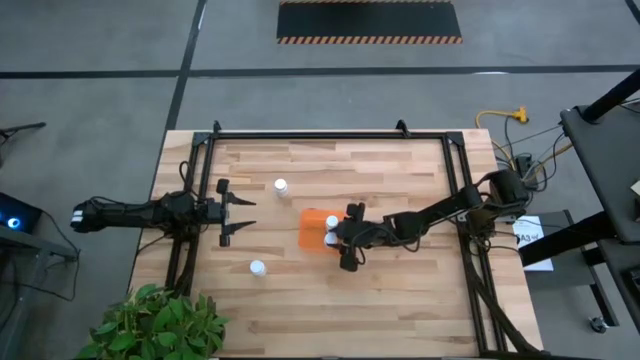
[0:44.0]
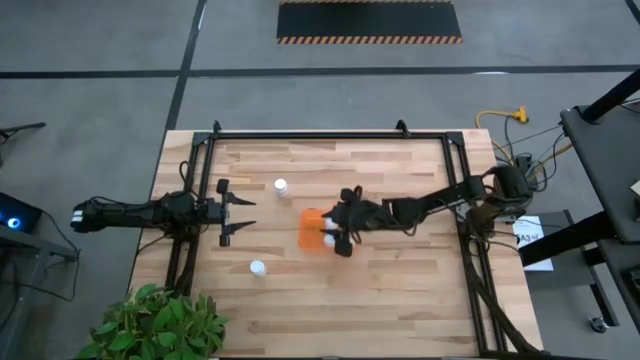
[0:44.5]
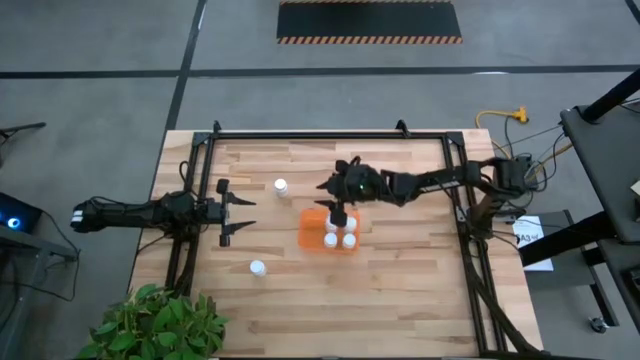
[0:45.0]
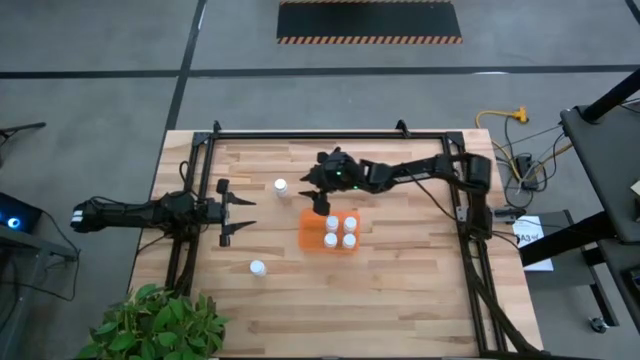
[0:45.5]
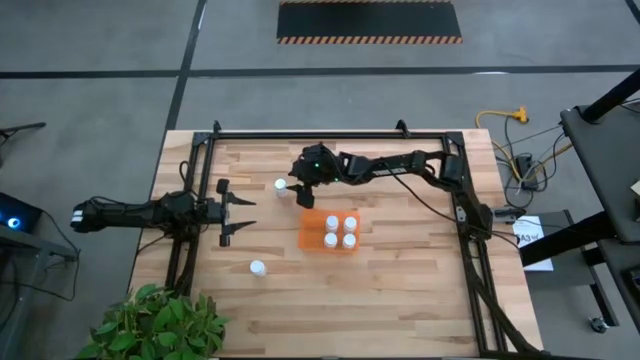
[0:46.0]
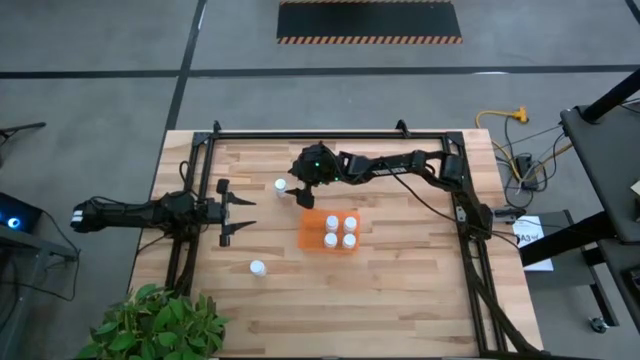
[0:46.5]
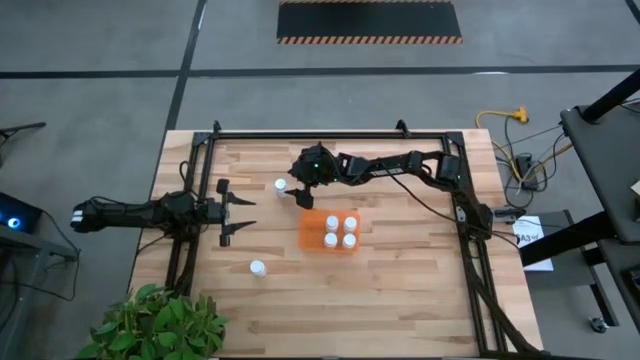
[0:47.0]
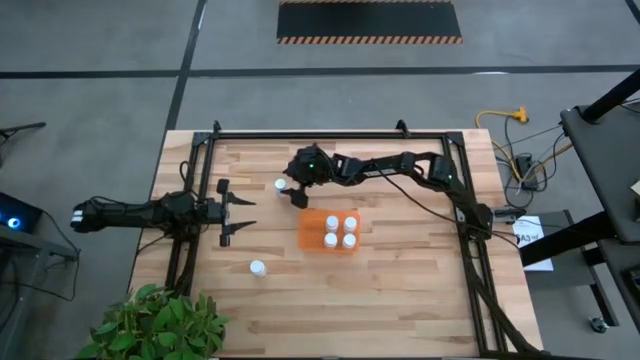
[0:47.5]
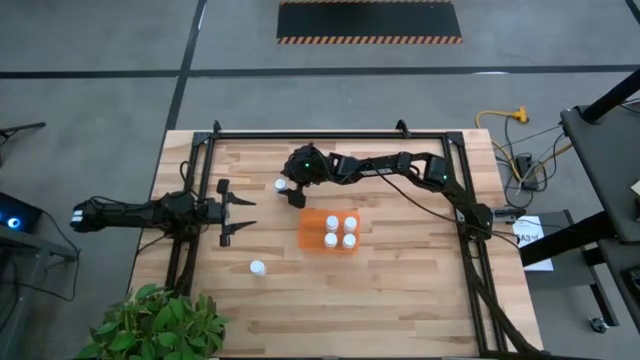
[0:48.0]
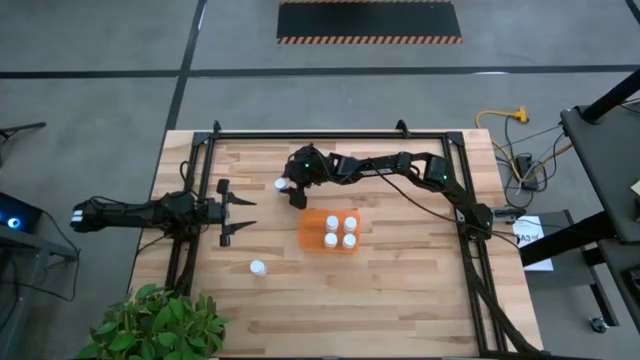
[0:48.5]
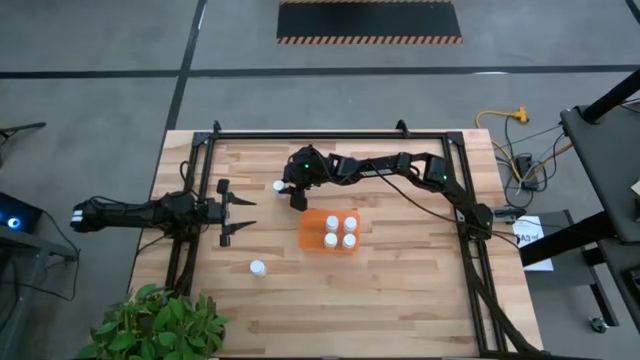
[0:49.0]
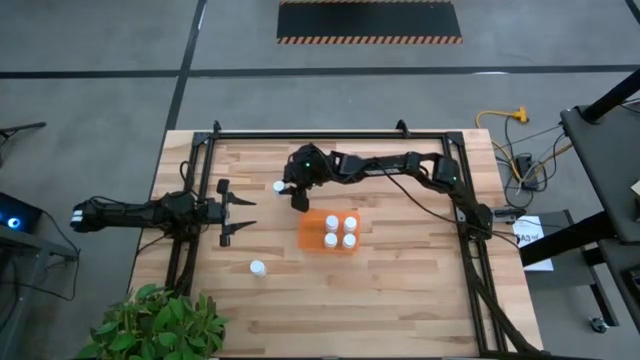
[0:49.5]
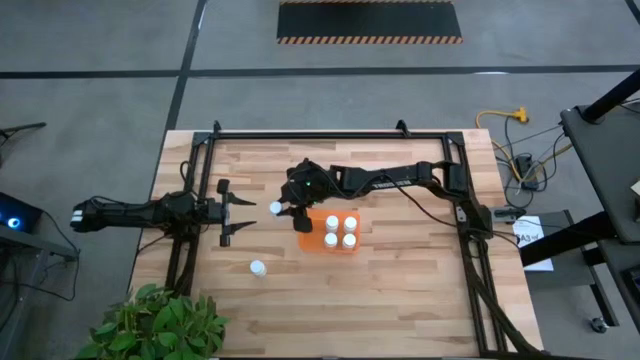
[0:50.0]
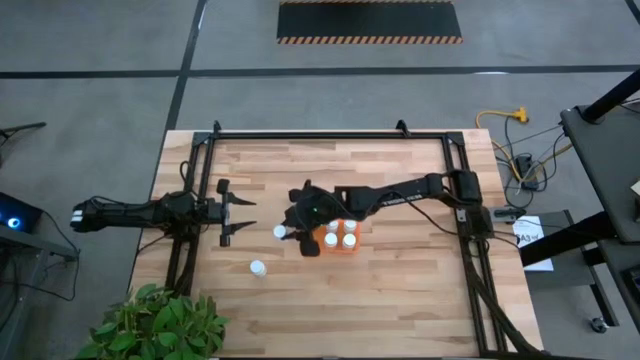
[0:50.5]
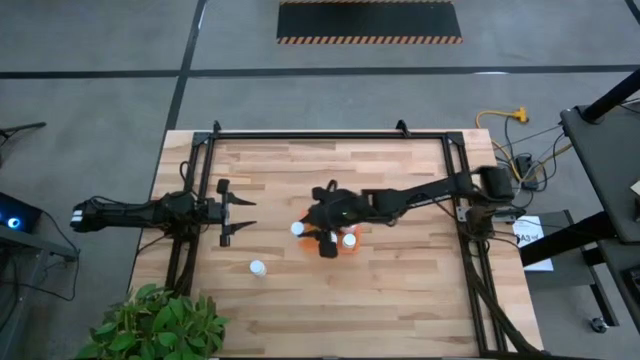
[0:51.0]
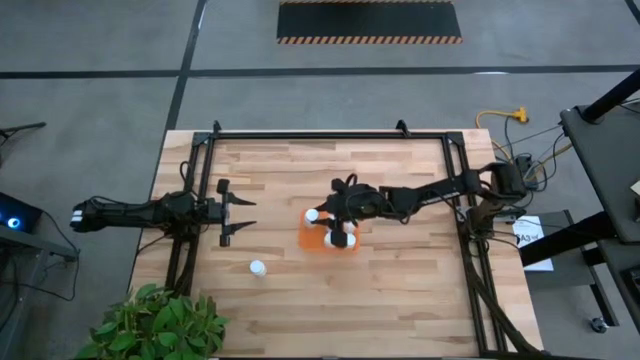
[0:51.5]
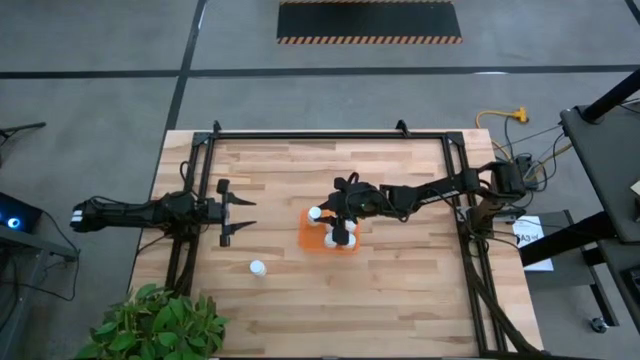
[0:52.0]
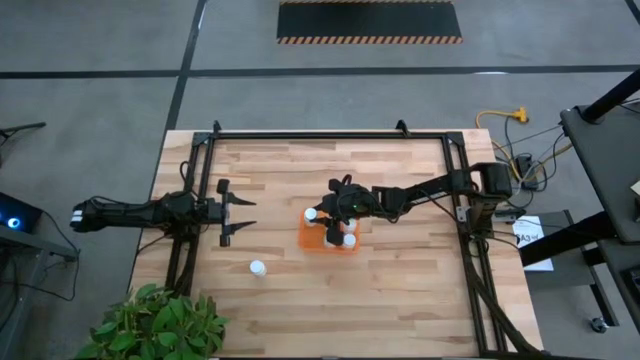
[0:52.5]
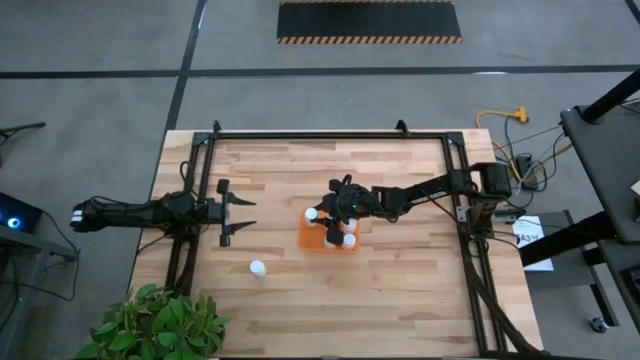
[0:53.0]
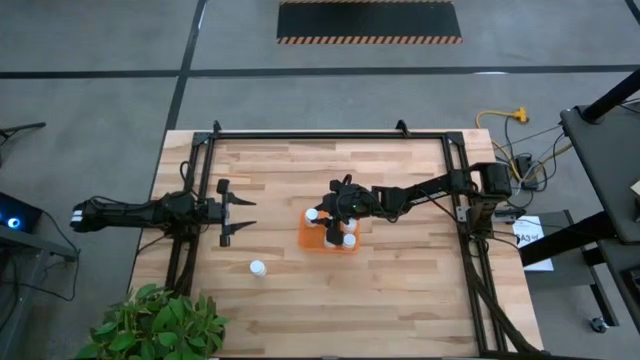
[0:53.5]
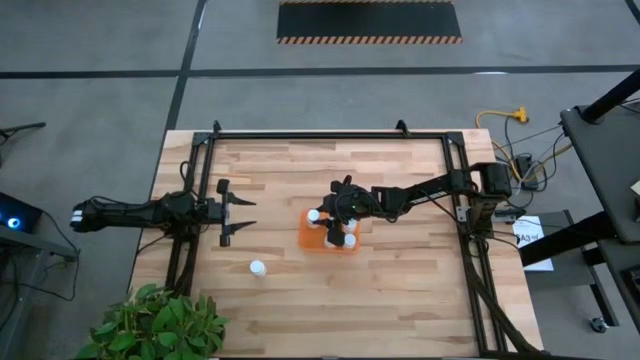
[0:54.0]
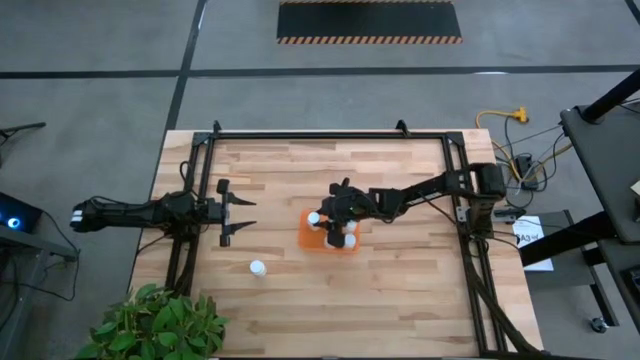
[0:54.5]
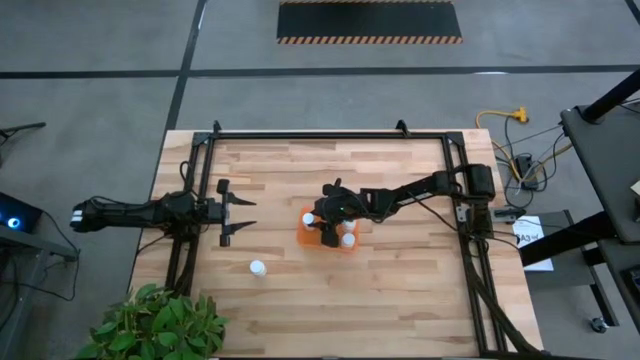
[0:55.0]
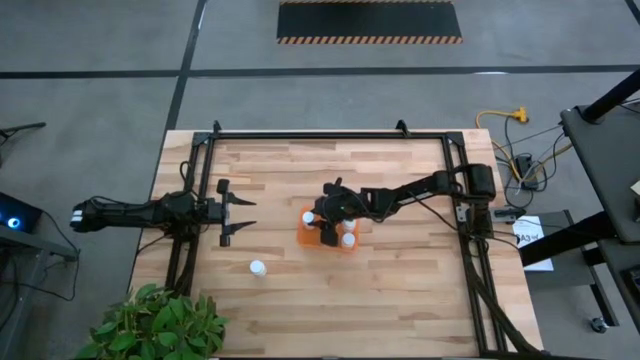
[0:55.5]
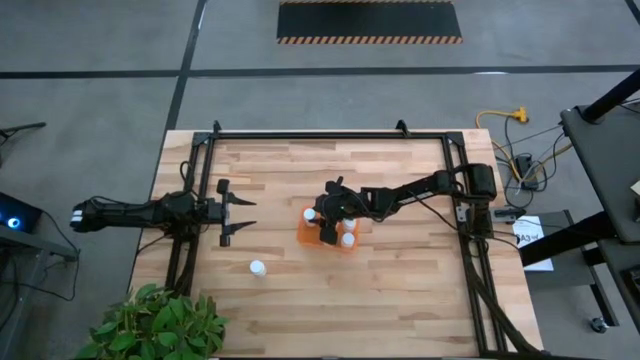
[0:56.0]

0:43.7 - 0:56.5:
Task: Pick and place pill bottles into a basket
Put the white medicine bottle into the orange bin

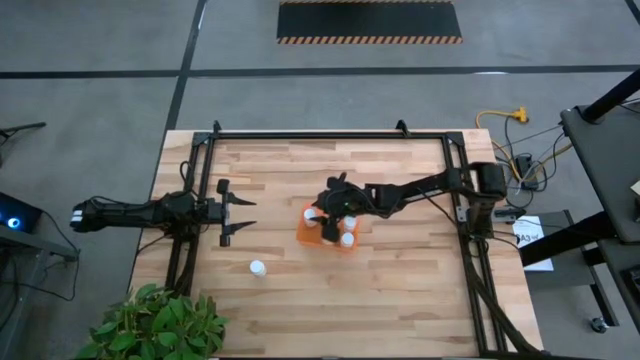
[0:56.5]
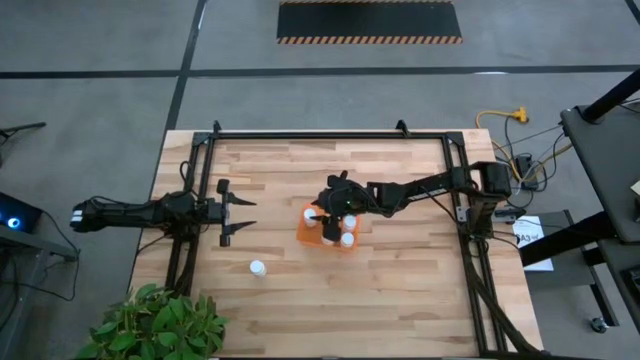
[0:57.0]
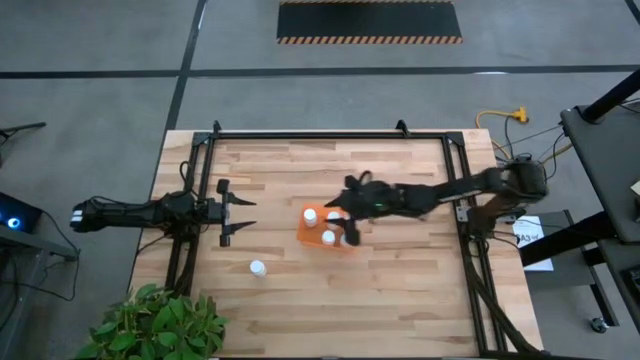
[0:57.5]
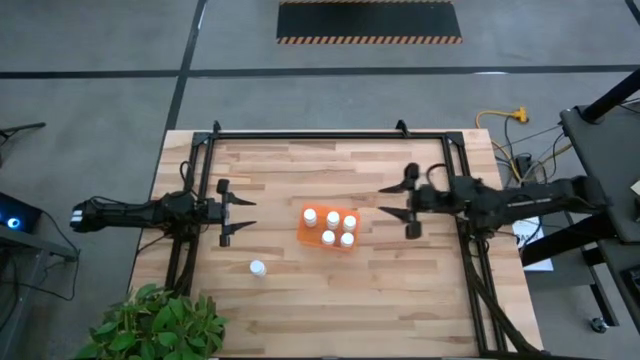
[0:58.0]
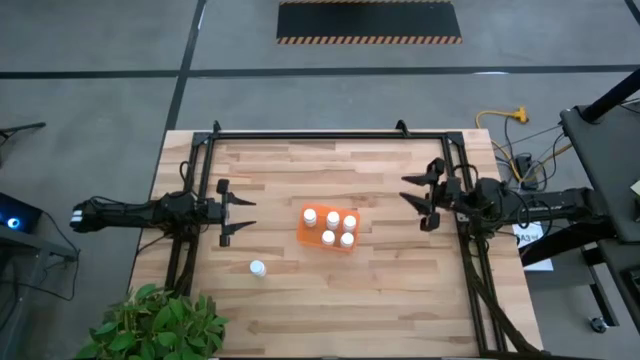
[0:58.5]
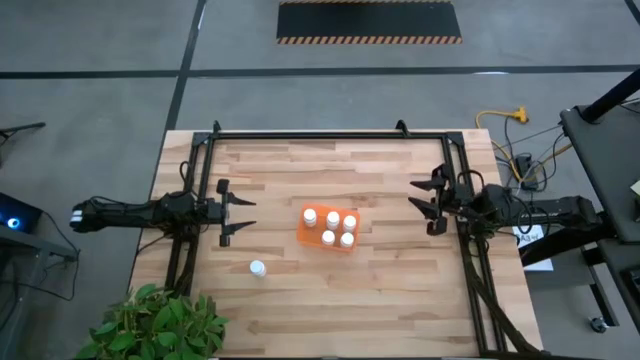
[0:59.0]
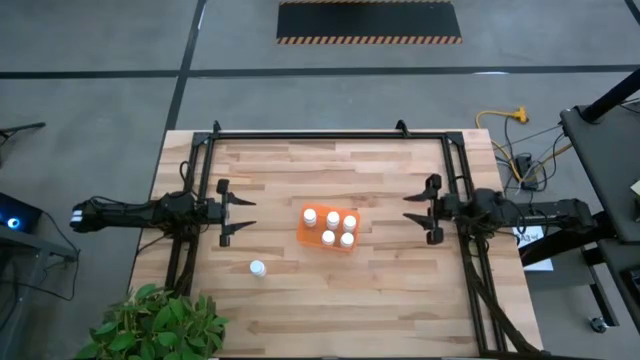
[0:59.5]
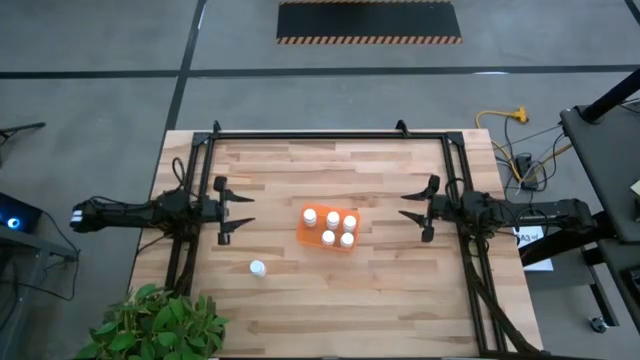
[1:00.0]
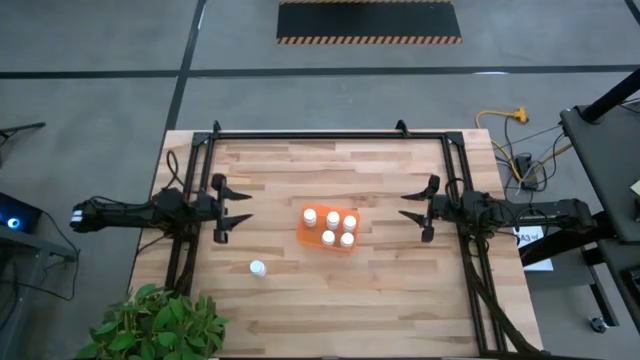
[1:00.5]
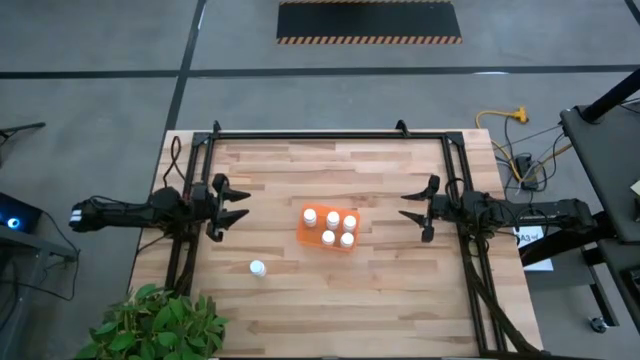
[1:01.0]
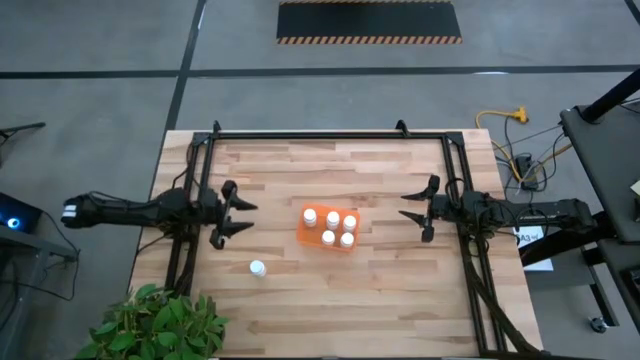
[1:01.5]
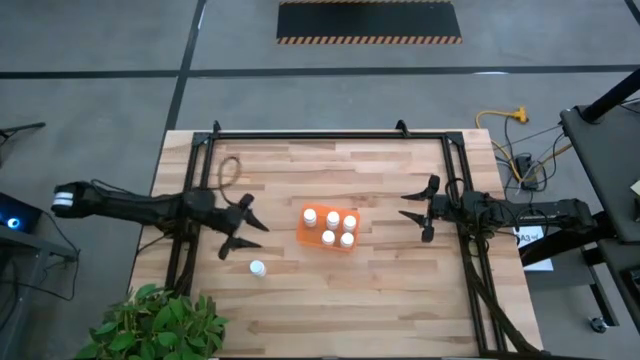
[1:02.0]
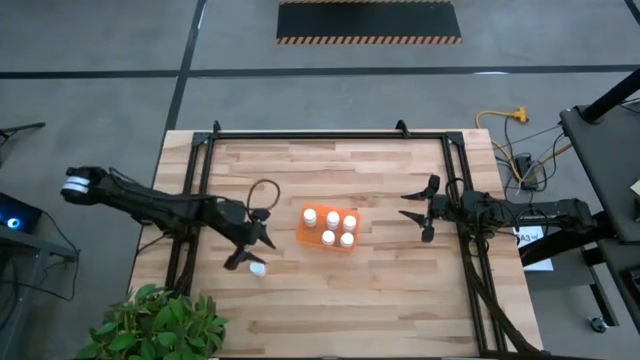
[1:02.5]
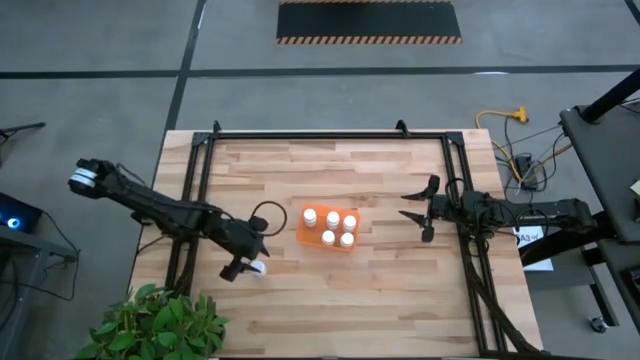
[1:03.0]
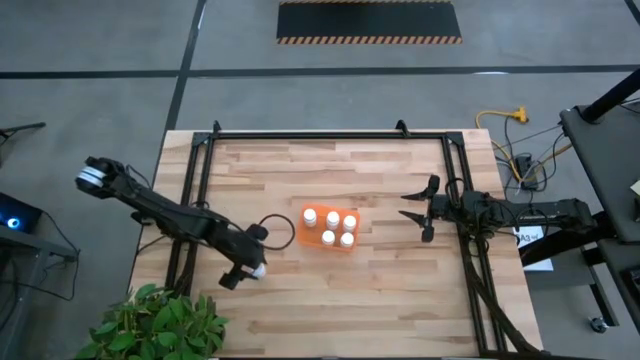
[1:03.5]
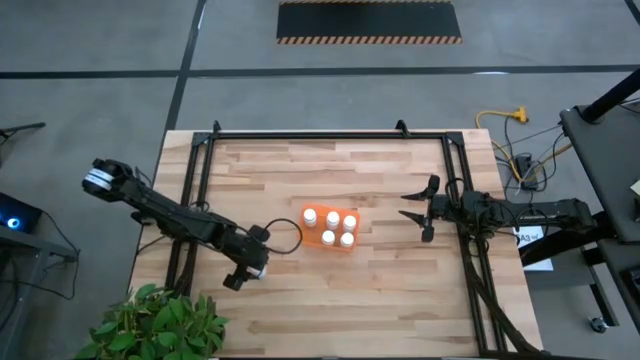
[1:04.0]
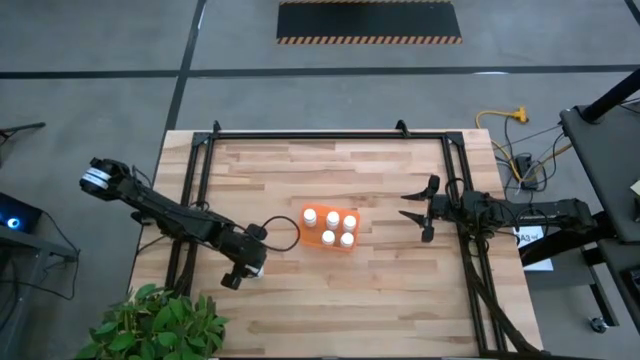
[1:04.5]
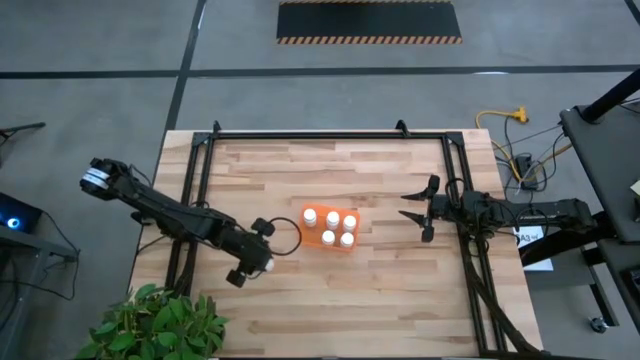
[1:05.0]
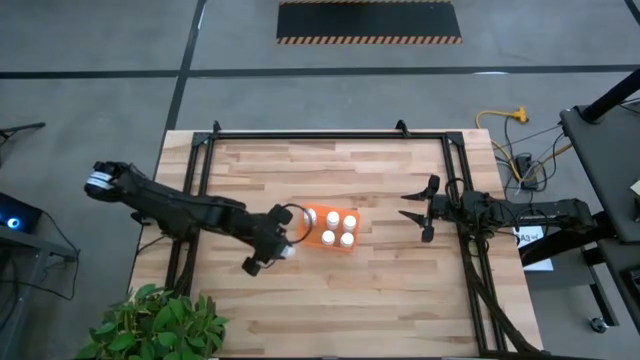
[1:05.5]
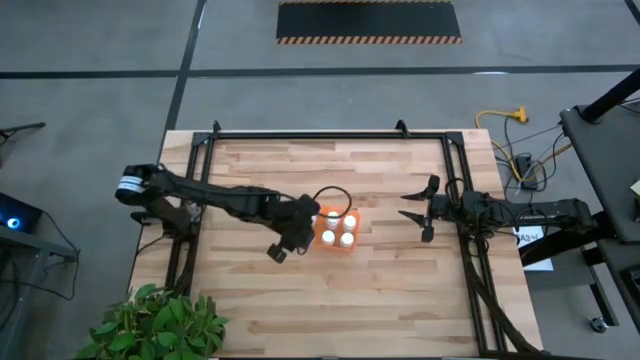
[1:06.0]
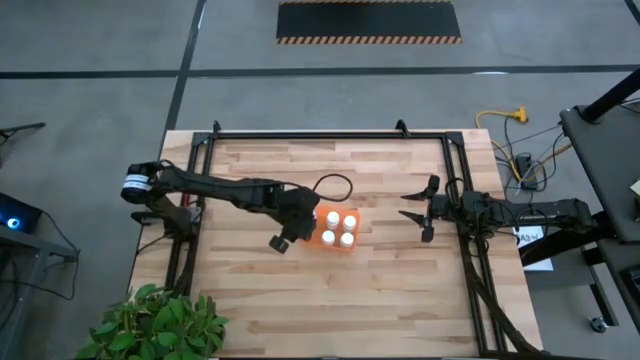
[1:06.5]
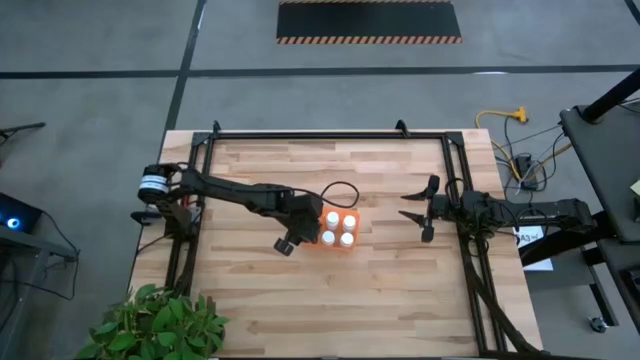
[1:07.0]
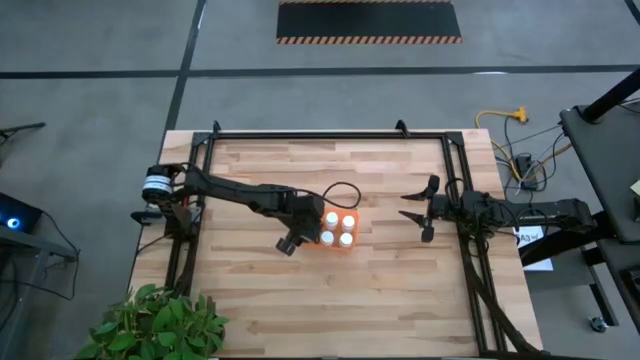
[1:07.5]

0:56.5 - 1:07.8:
Put the white medicine bottle into the orange bin
